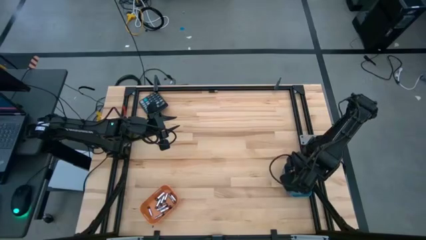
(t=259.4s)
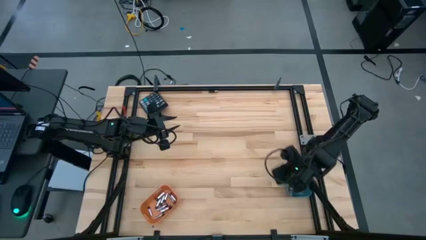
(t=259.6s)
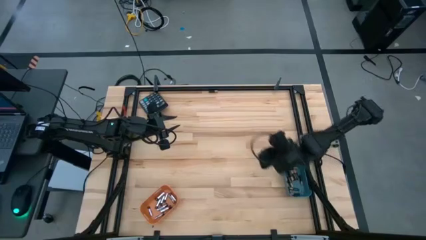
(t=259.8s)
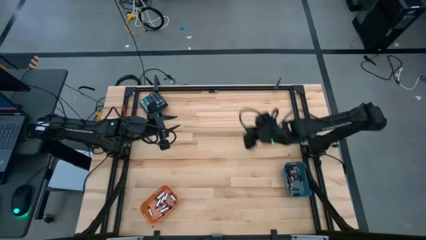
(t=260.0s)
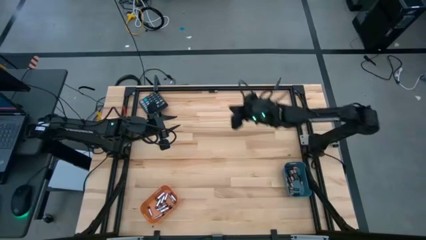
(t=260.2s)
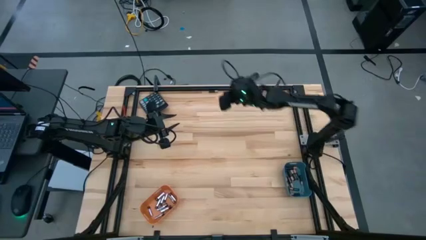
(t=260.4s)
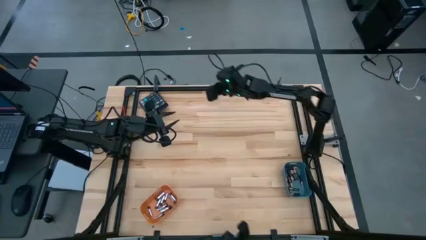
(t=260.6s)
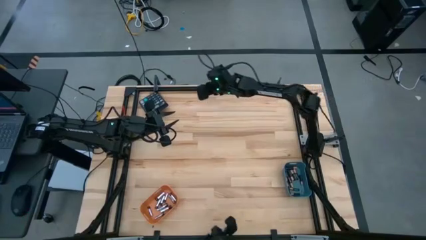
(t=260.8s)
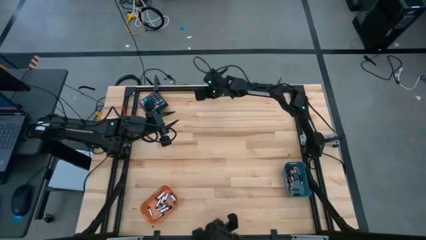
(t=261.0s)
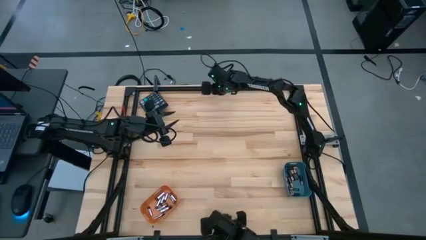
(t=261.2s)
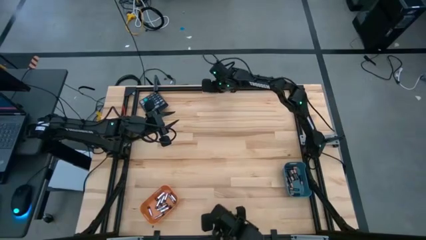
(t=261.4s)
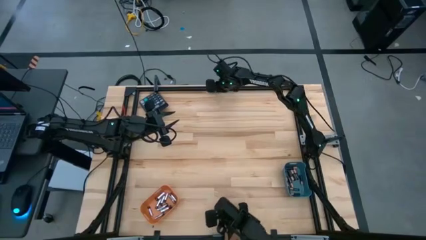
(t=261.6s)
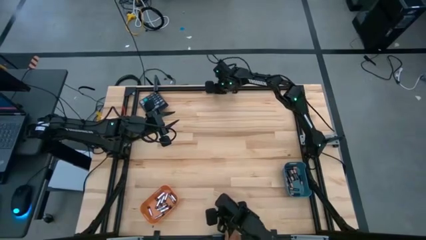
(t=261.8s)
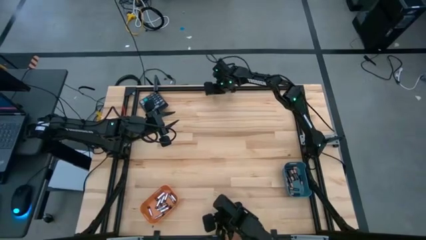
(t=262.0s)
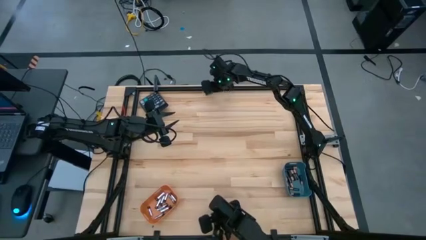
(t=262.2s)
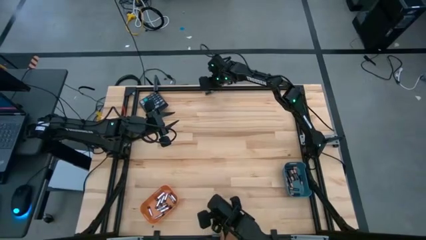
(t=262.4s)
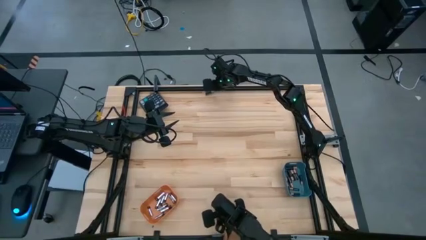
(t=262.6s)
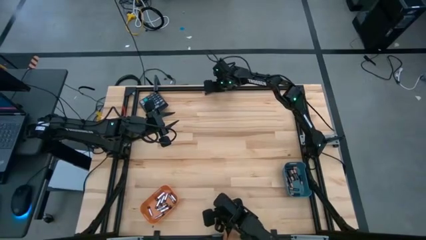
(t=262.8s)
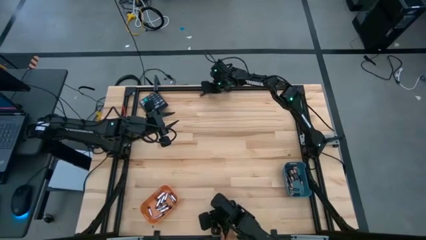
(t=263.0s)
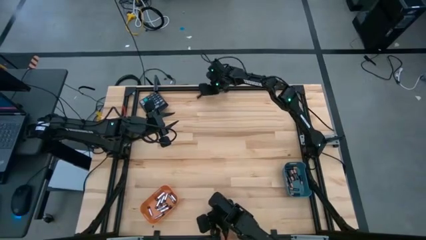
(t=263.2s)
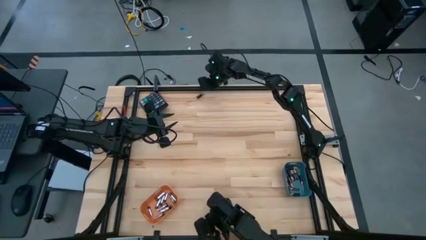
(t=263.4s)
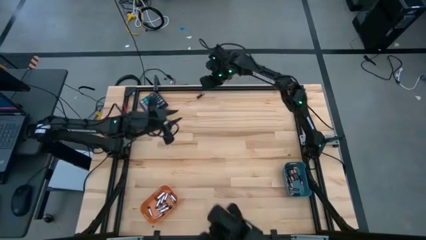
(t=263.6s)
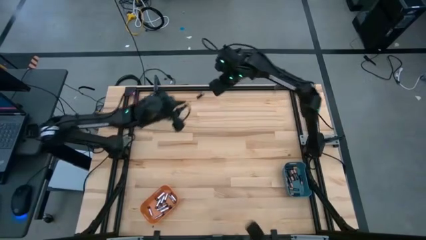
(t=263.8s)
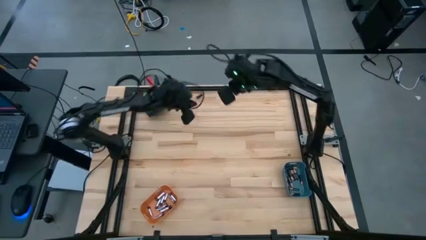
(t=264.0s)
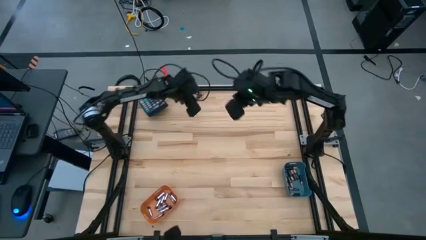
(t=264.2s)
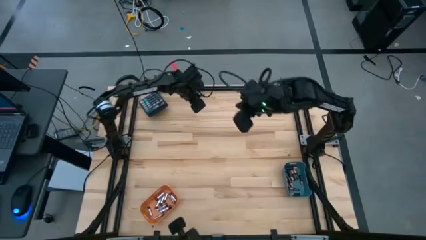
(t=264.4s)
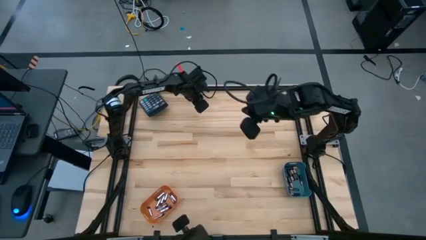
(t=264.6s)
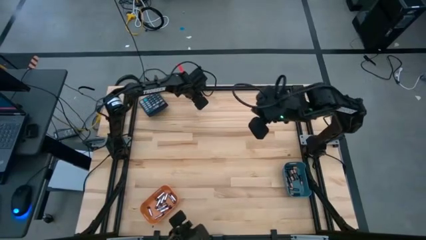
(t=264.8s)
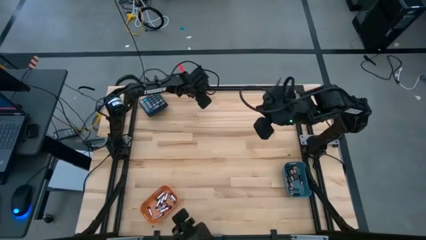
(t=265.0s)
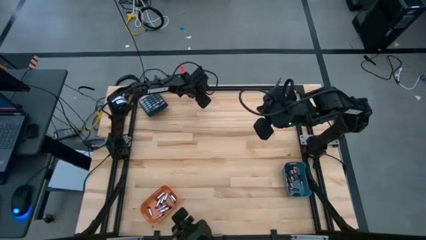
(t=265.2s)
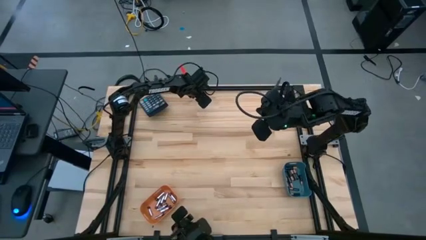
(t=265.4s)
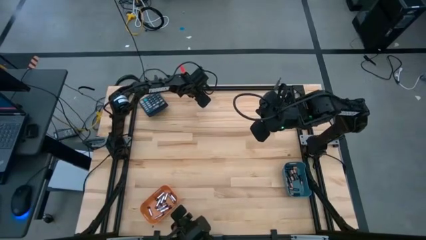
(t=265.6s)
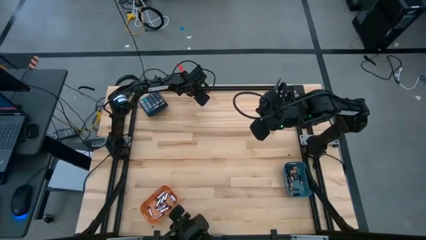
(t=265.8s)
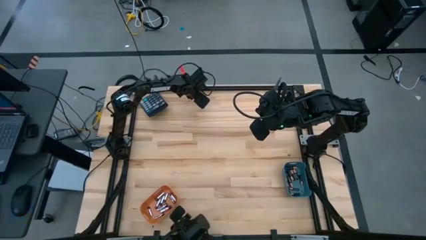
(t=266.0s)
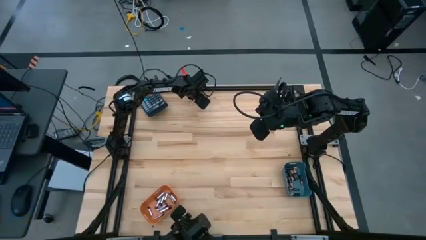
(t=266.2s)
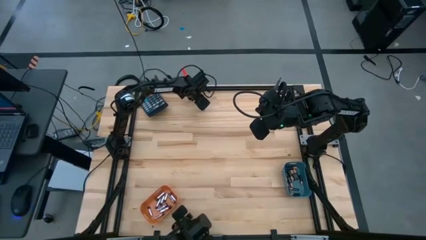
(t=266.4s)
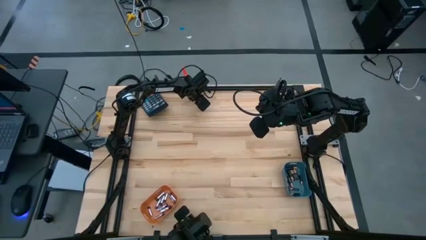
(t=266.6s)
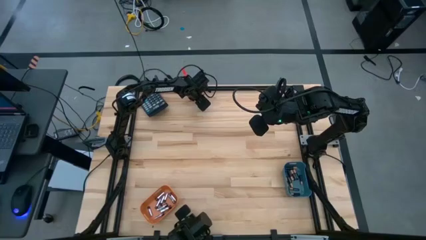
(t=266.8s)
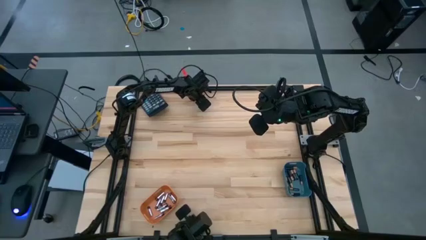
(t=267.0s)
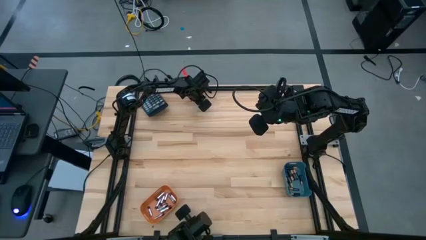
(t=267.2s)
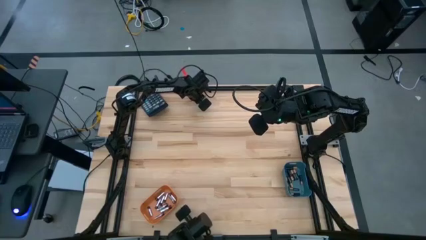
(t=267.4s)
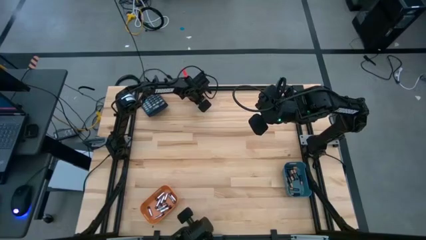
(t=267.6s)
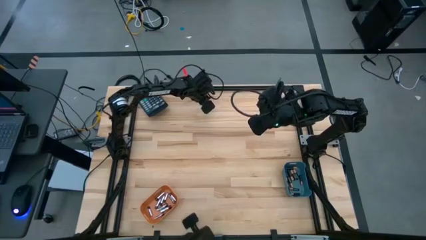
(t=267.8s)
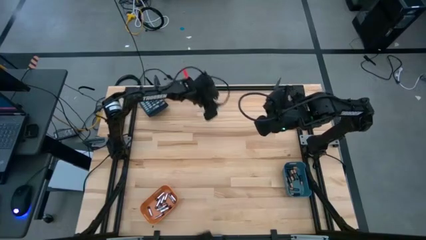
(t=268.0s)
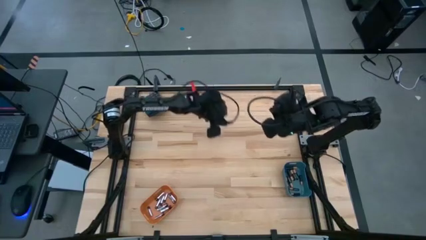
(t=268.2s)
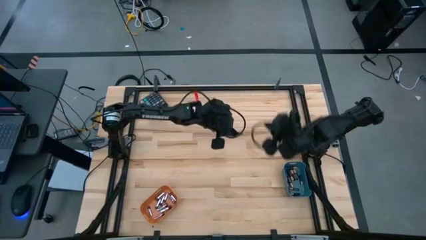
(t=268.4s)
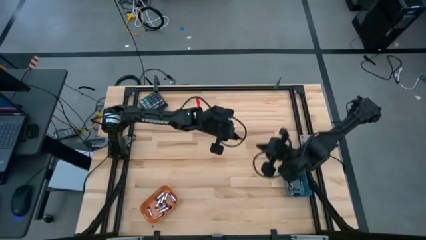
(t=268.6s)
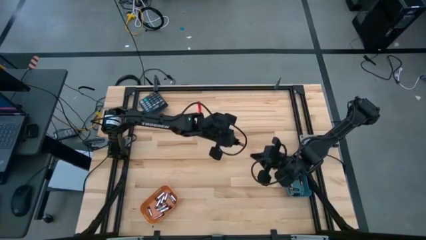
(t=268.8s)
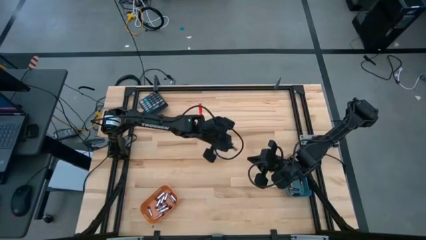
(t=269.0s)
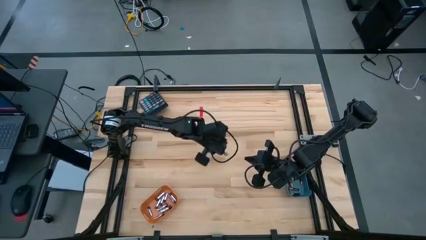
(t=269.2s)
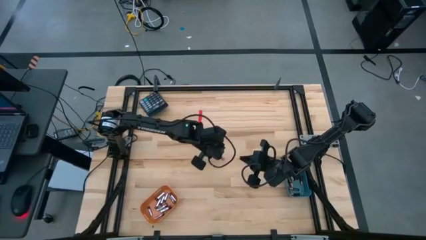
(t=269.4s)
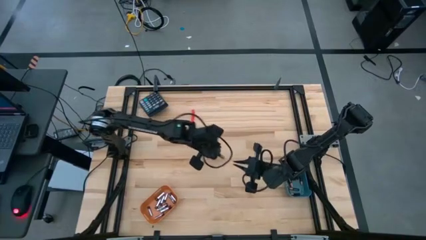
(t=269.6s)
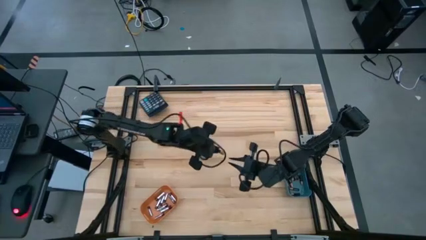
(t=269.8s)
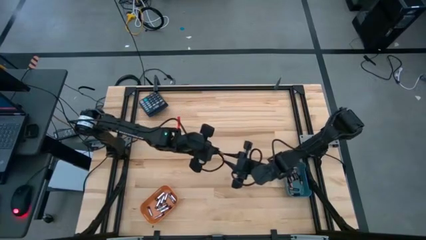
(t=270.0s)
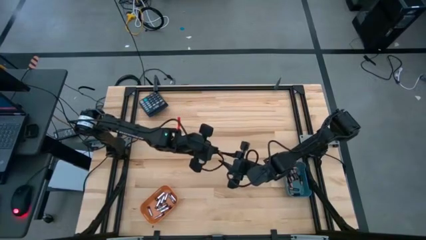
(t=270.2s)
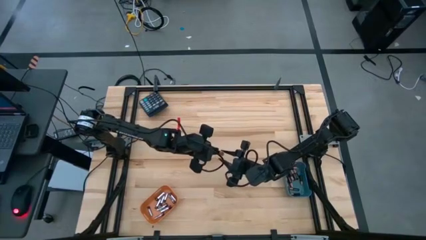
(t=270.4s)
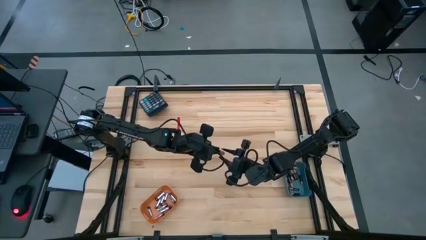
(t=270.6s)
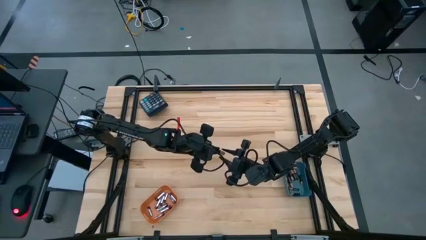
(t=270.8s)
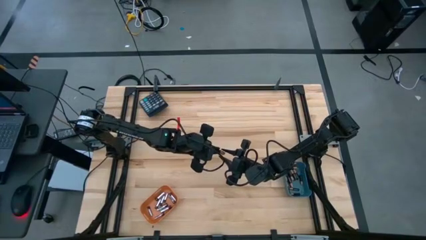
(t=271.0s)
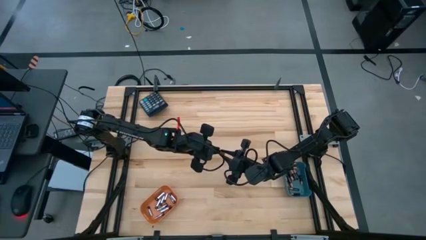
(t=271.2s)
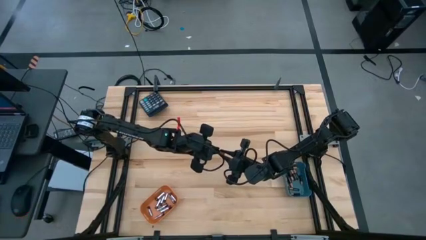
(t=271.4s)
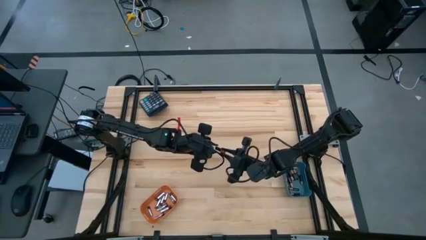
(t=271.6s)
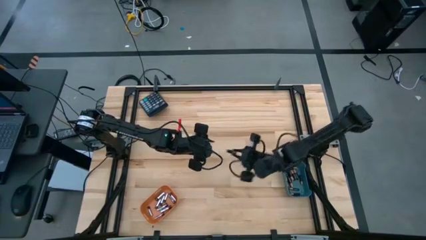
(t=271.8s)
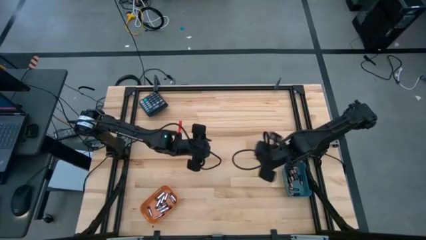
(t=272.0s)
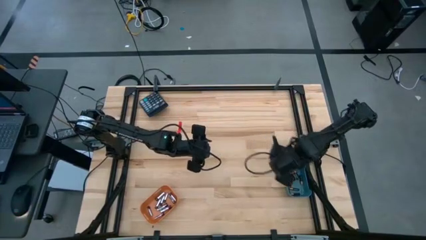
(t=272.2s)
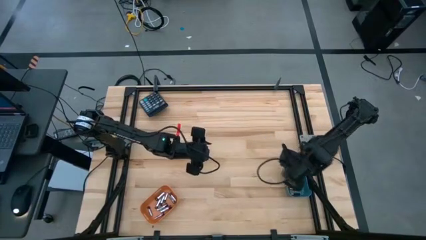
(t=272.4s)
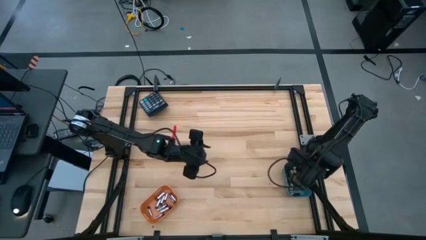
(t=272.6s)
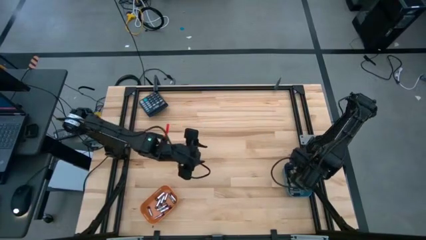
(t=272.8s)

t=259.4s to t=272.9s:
Task: Sort batteries
Put the black battery into the blue bin

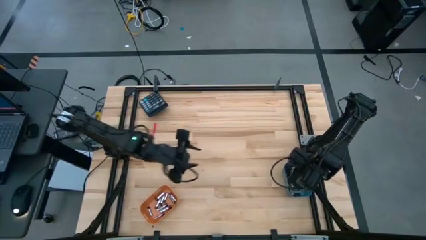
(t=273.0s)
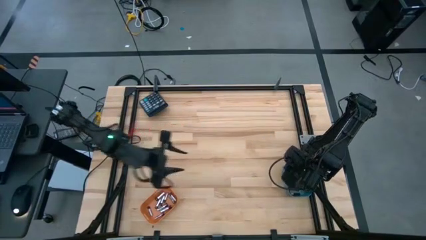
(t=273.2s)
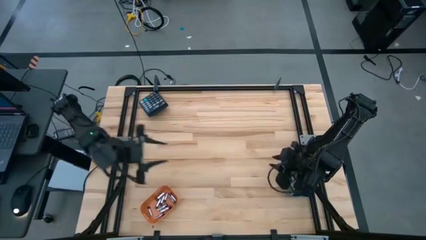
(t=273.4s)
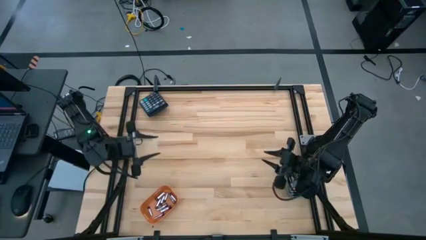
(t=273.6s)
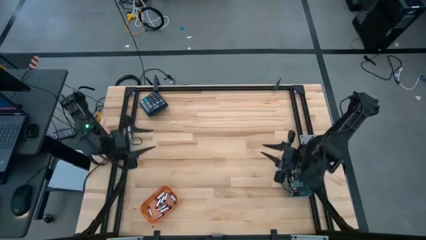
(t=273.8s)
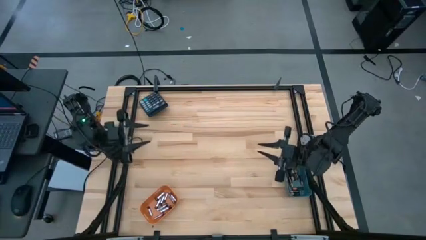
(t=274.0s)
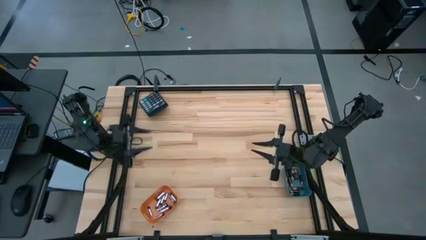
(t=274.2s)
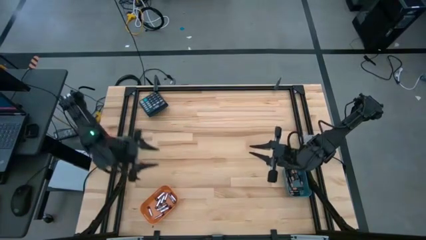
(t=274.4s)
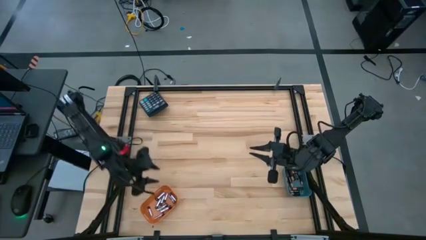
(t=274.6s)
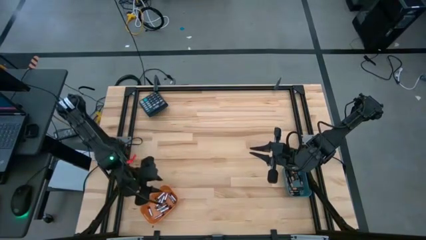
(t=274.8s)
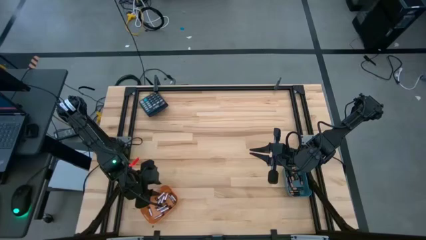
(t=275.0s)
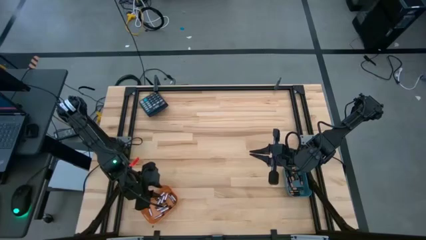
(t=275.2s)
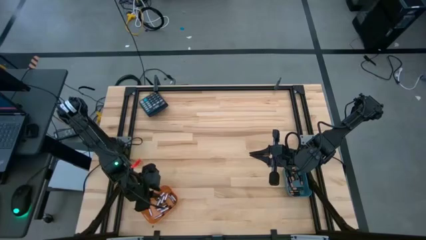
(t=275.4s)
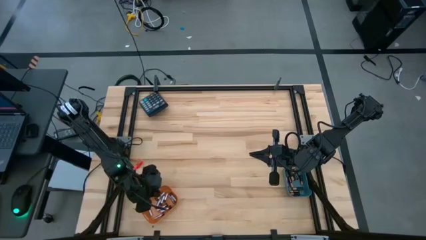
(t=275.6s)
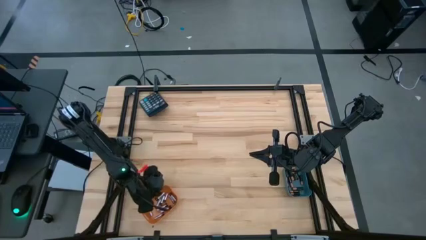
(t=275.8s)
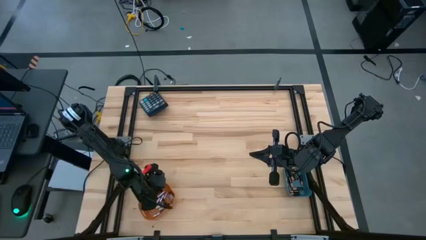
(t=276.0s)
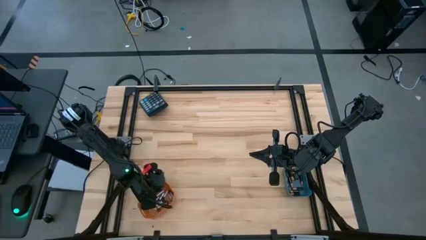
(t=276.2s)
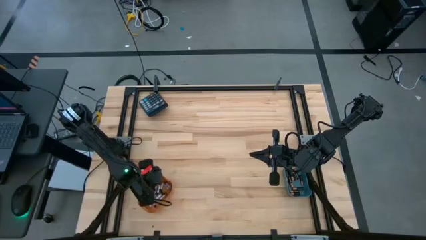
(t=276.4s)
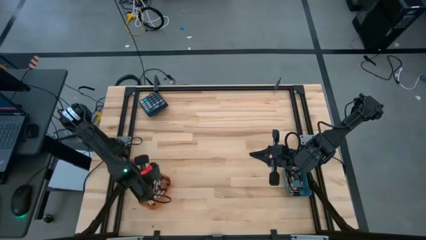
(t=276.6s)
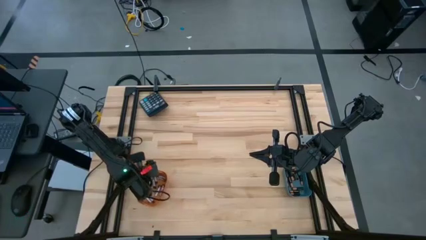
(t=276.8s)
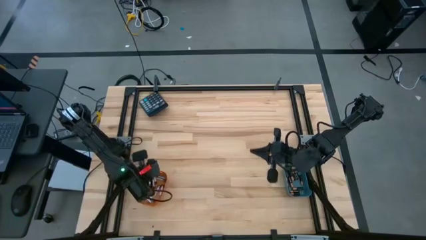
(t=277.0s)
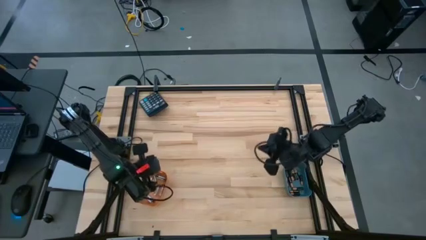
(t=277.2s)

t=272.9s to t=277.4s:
Adjust the orange bin
